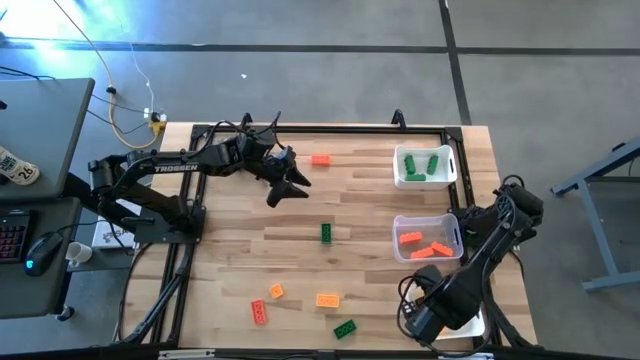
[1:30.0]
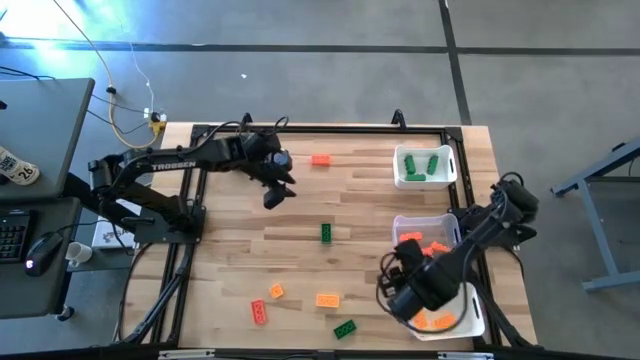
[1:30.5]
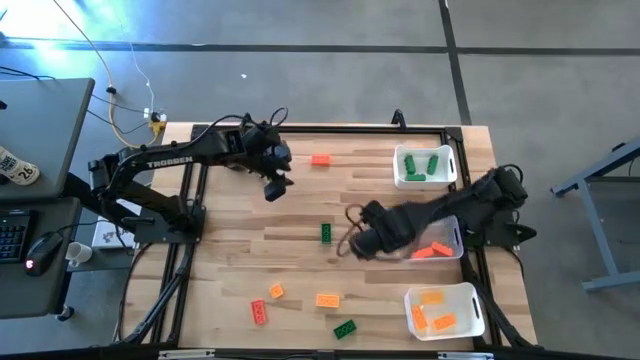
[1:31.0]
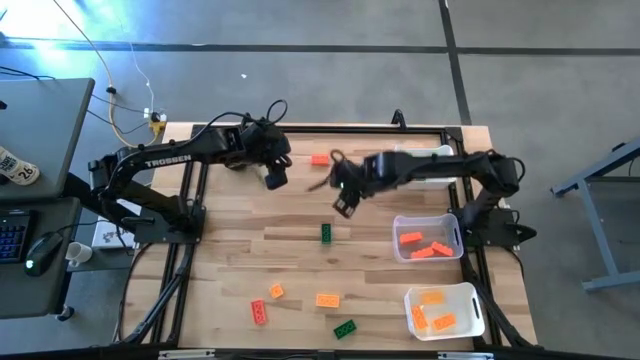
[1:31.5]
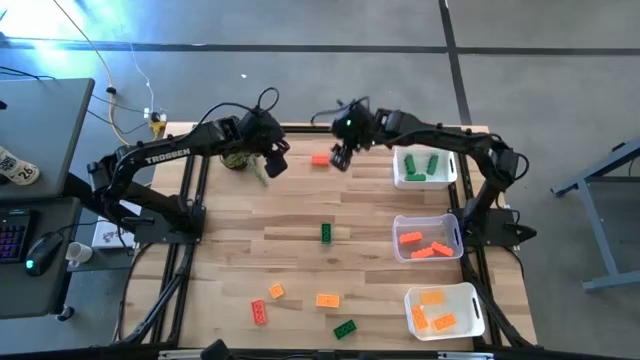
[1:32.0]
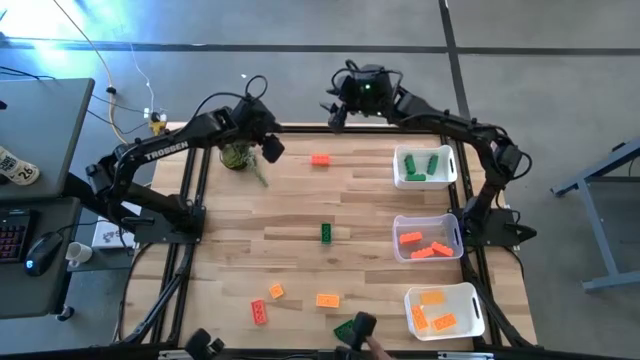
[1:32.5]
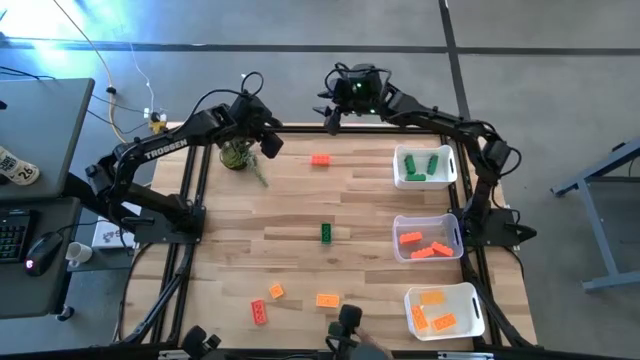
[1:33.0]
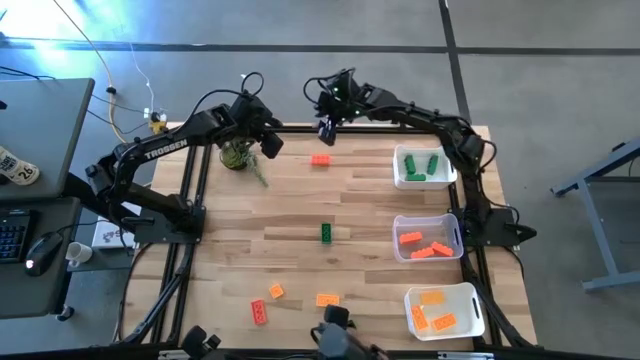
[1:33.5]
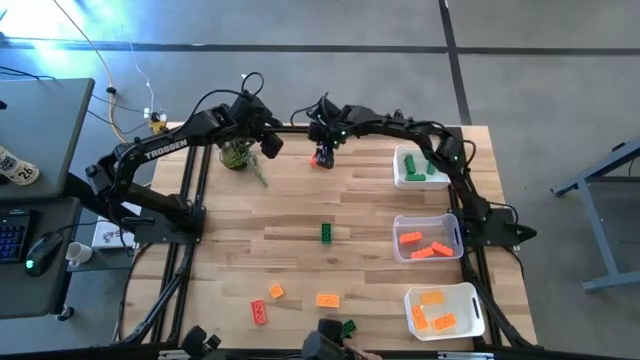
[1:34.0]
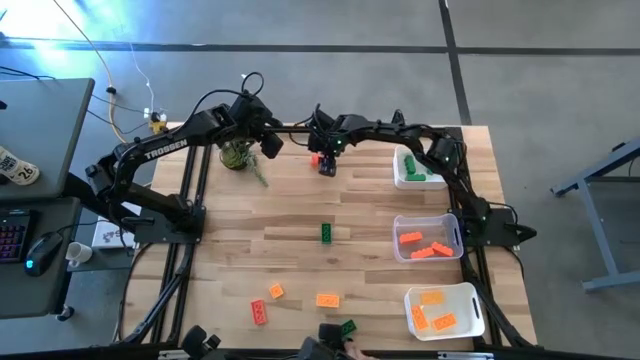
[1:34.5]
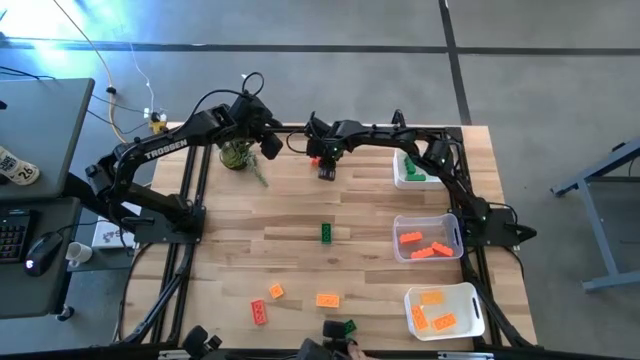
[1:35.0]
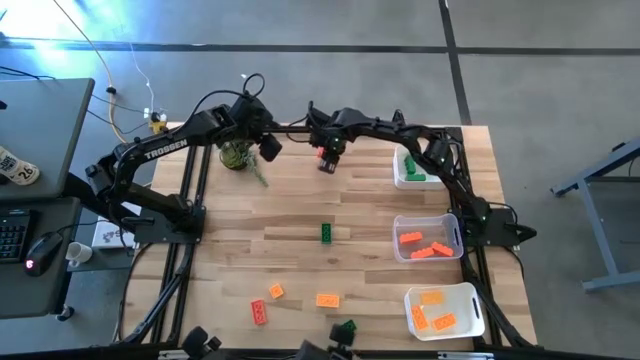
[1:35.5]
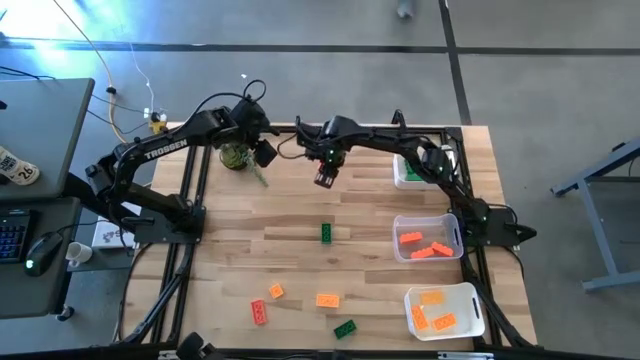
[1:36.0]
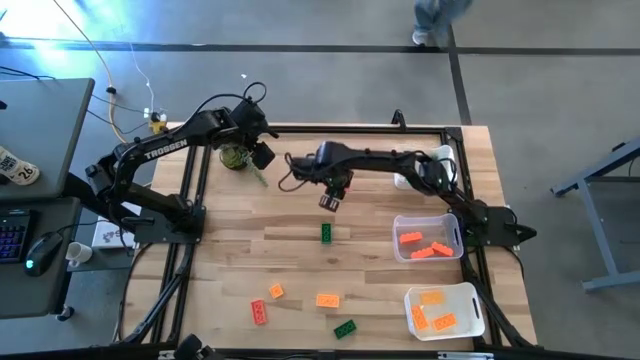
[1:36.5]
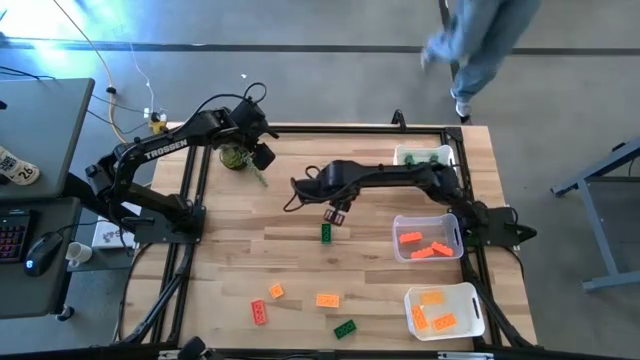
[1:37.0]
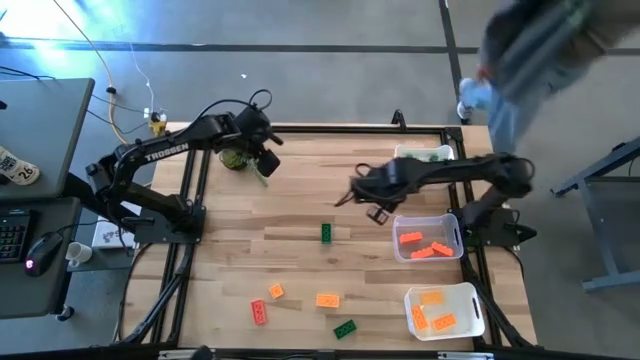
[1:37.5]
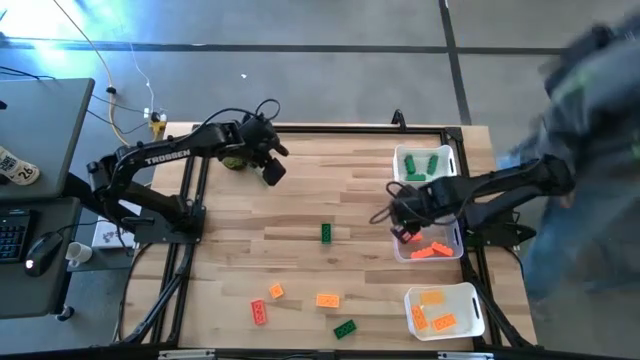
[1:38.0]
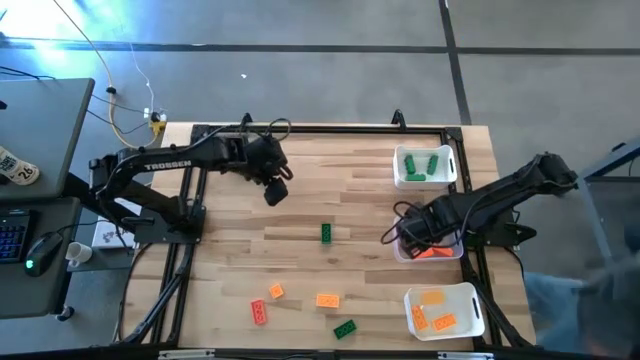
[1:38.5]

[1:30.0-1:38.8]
Task: Sort & place blocks by color
Put the orange game piece into the transparent bin

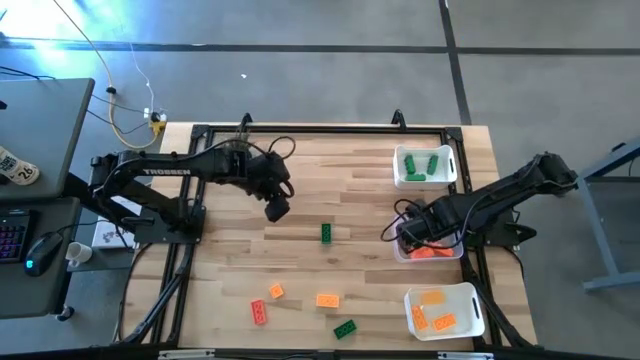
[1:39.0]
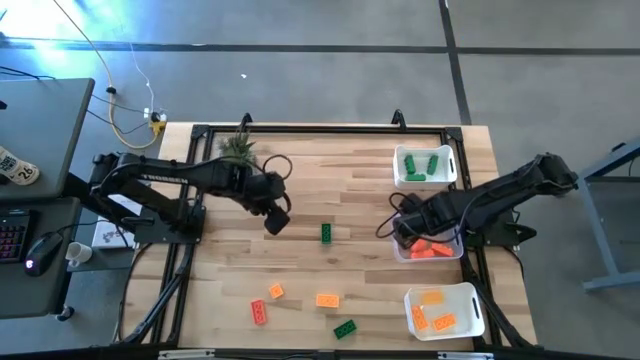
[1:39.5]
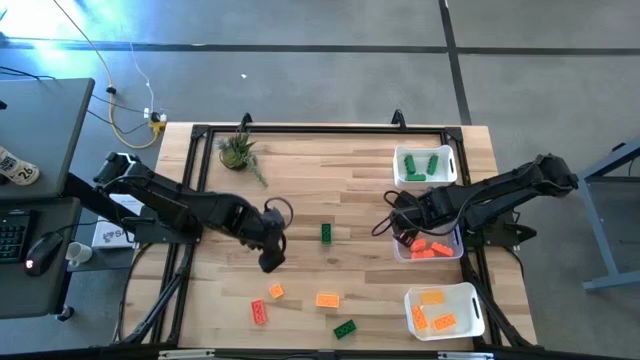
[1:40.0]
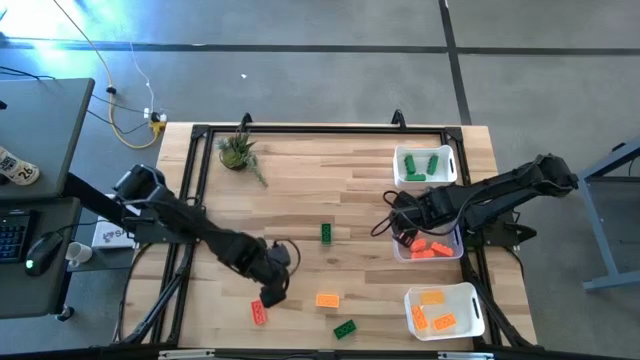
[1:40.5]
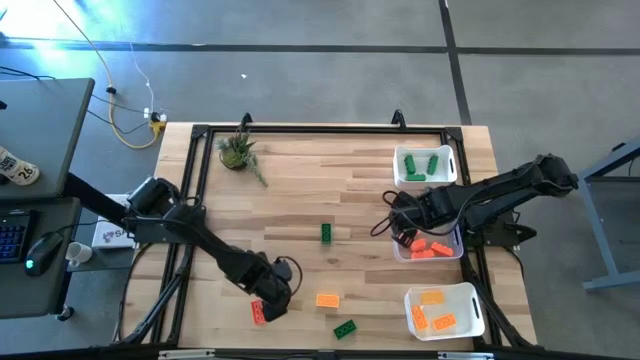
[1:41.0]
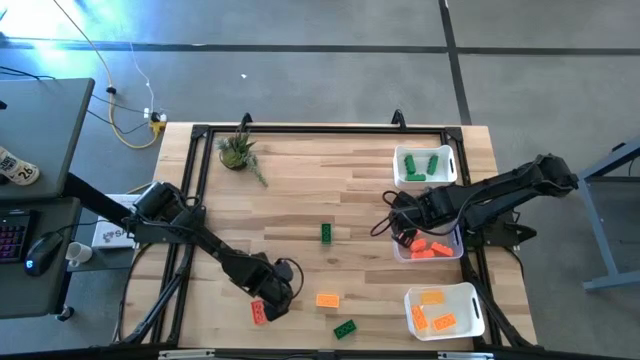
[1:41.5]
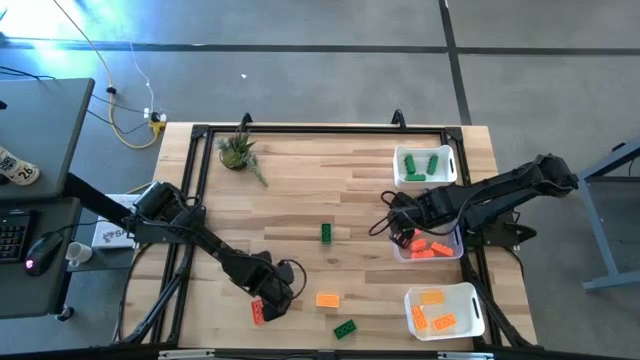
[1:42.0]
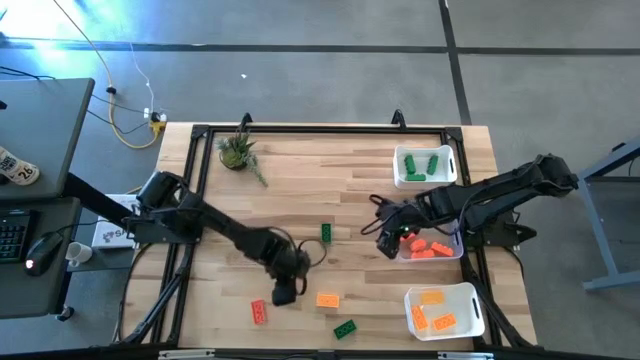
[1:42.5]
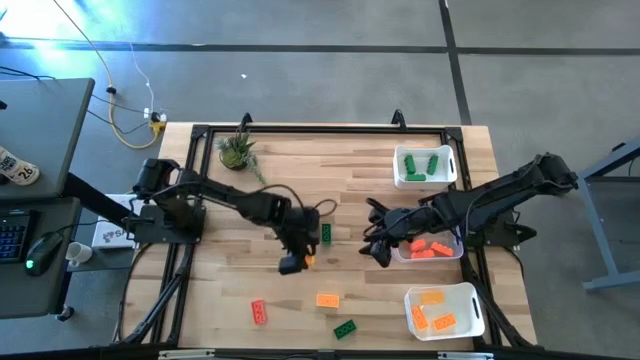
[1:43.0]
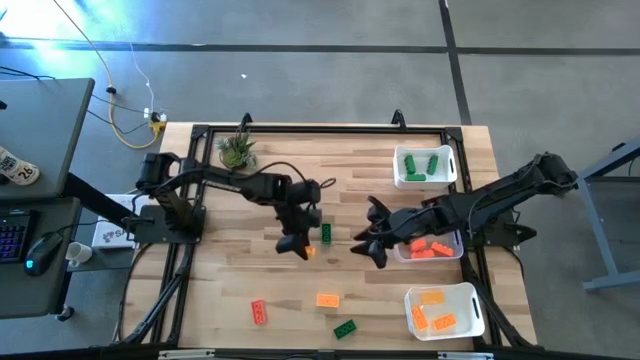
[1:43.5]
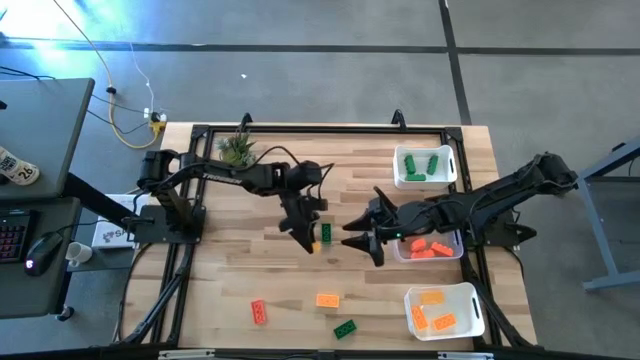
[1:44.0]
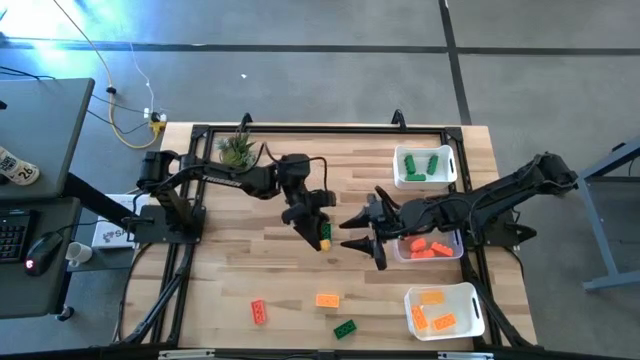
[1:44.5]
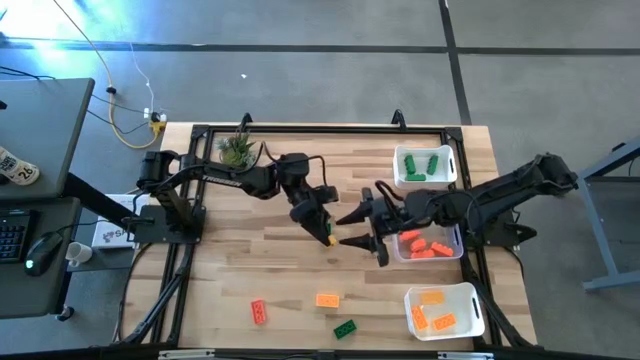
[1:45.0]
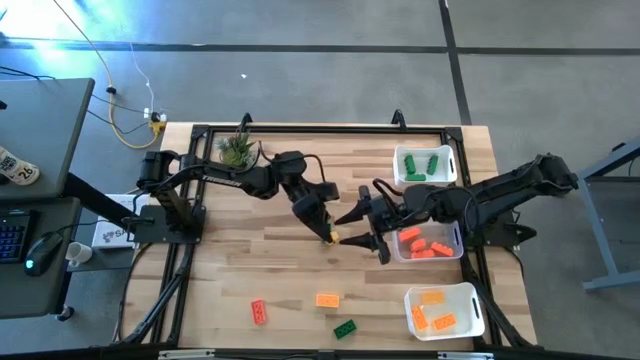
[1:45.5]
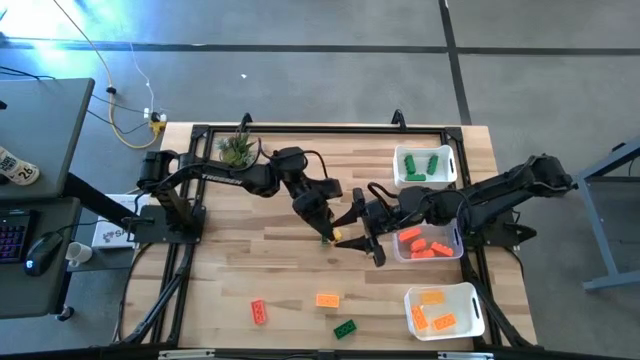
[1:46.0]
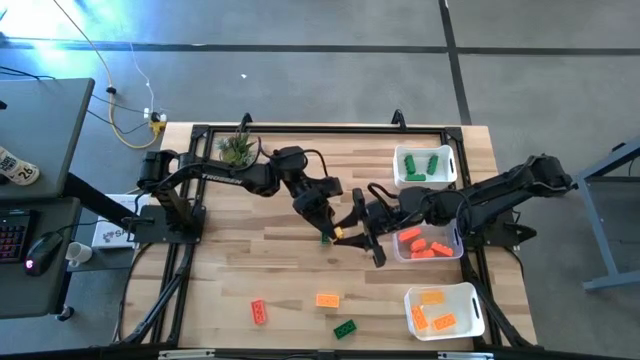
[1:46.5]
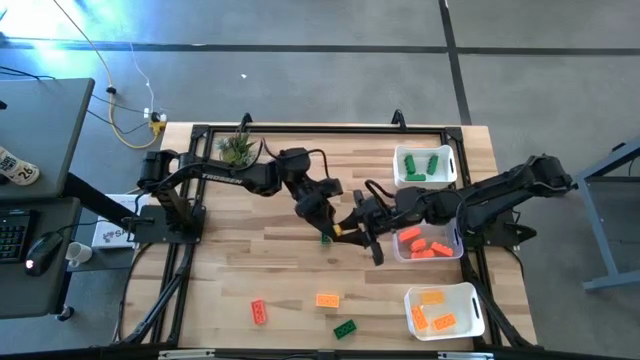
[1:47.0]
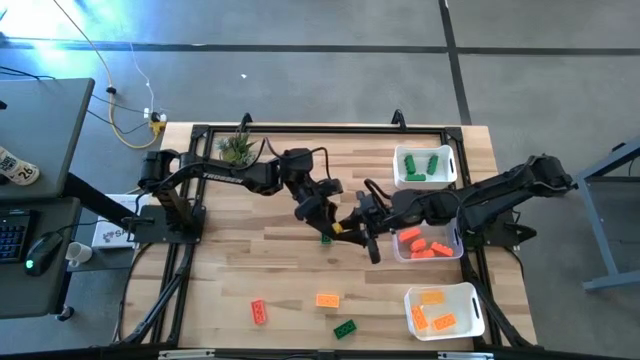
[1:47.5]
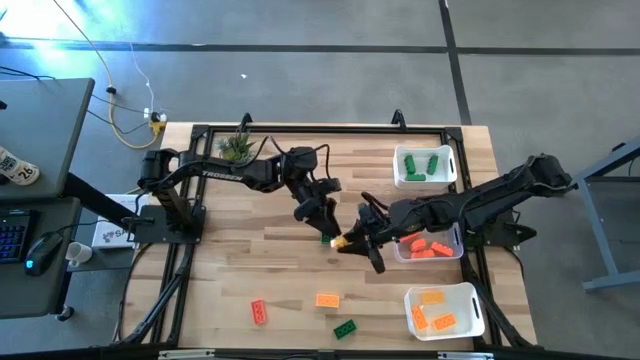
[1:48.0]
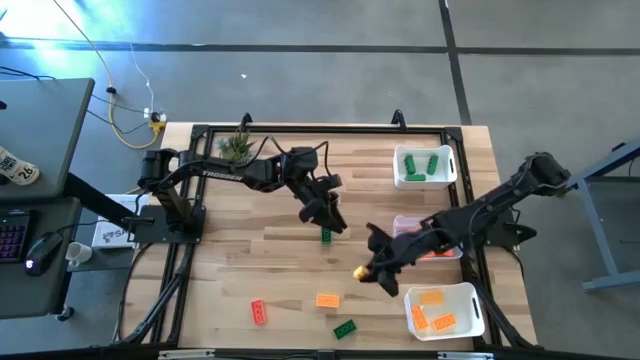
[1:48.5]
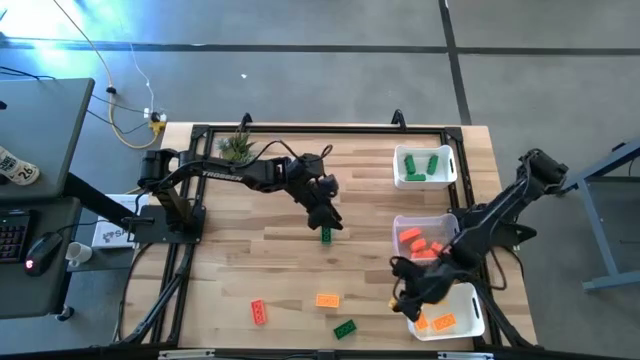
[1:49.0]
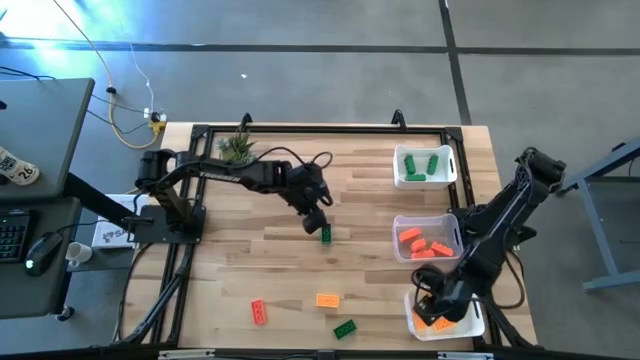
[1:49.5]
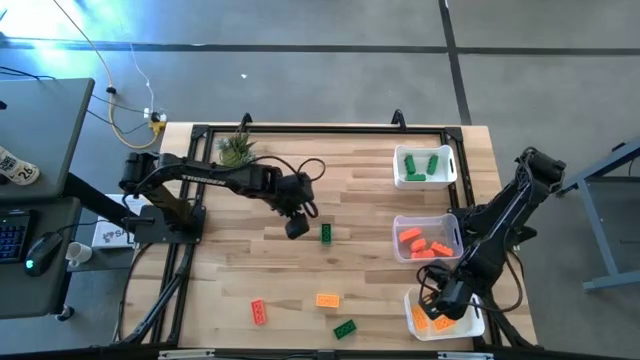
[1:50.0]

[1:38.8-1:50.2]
Put the yellow game piece into the bottom white bin

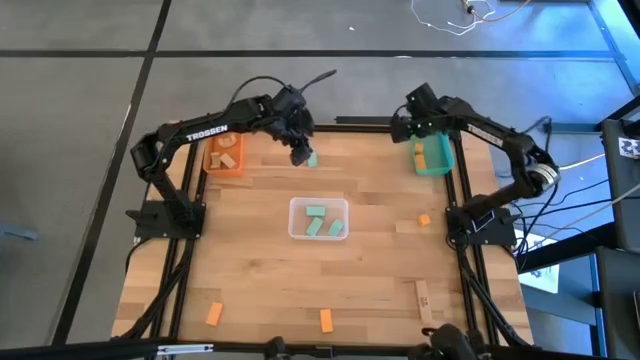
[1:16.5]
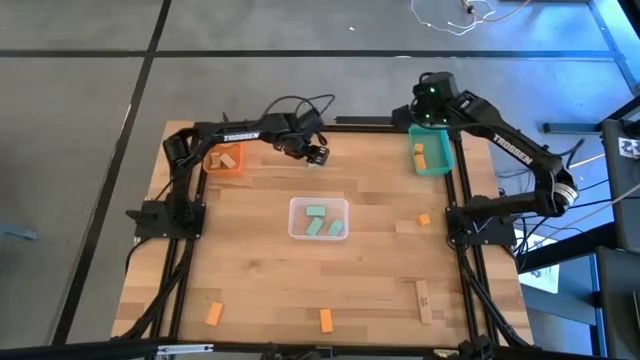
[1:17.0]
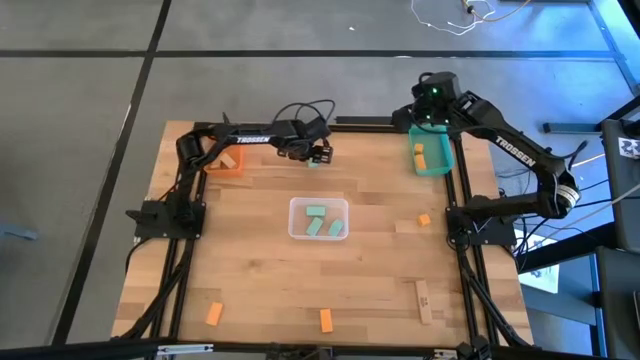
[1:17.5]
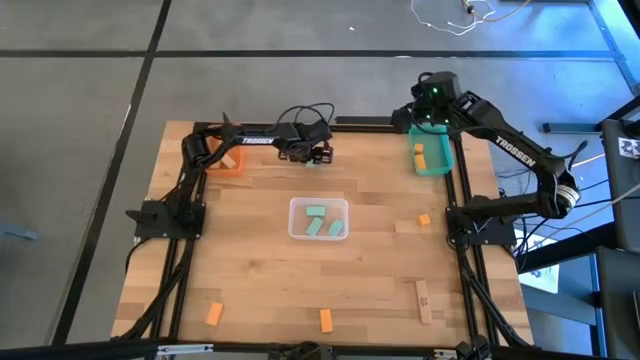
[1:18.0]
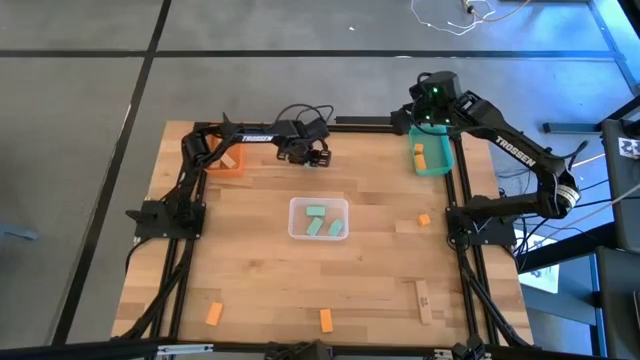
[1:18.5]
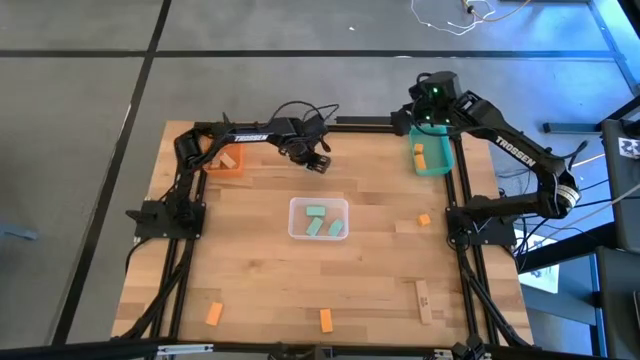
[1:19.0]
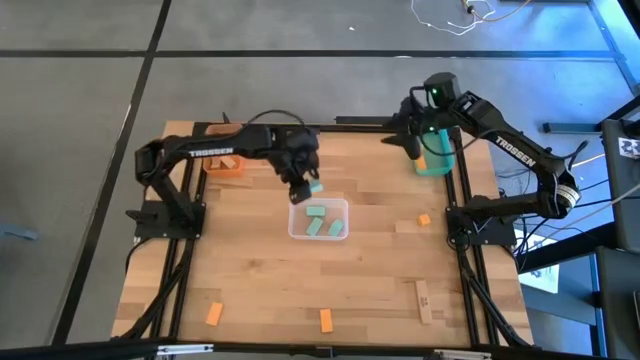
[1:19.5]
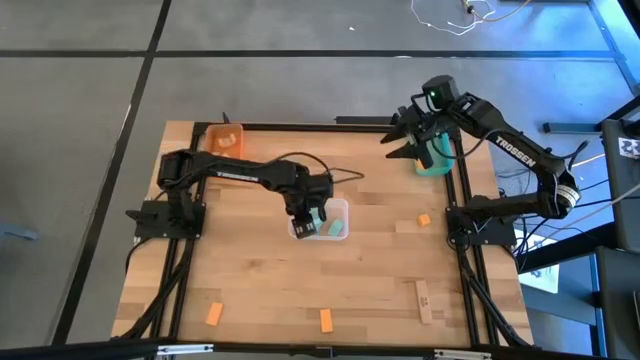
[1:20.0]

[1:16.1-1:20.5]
Task: Sort & place blocks by color
Put the blue block into the transparent bin
